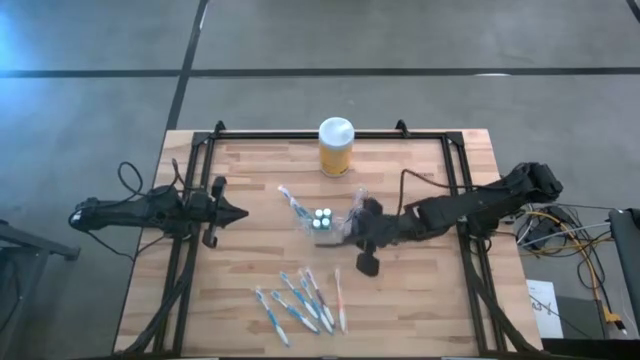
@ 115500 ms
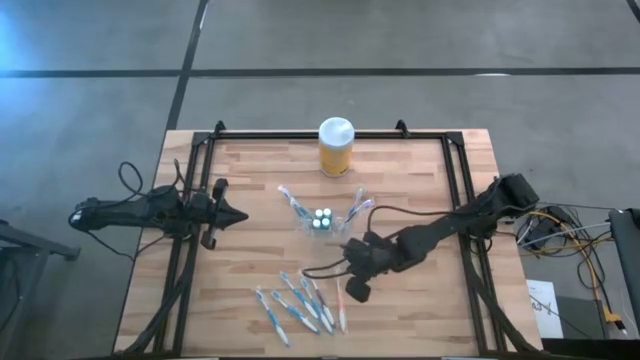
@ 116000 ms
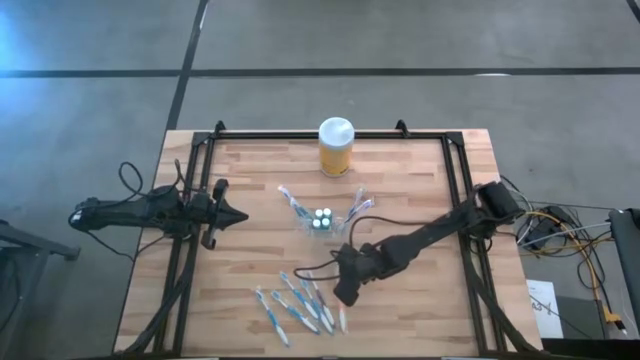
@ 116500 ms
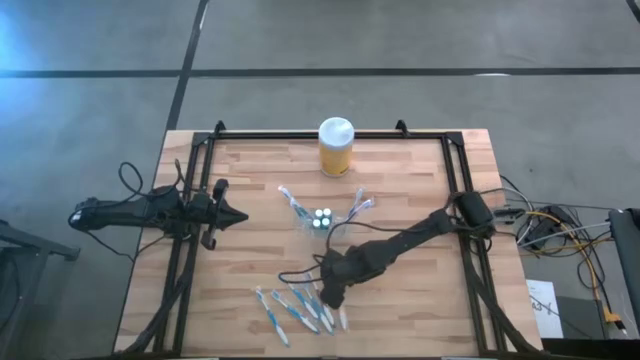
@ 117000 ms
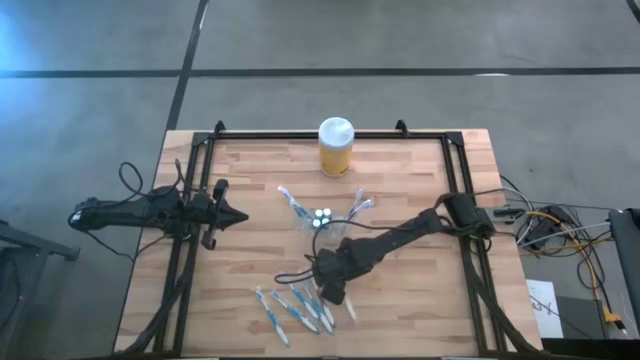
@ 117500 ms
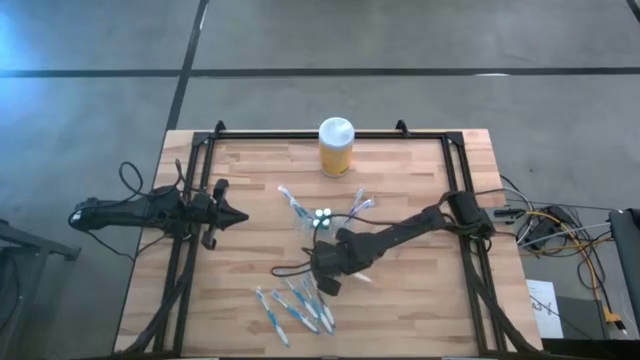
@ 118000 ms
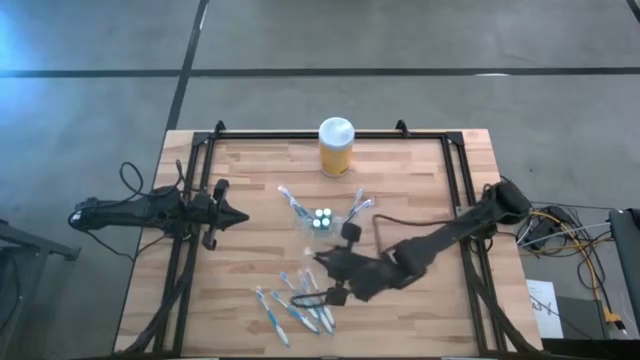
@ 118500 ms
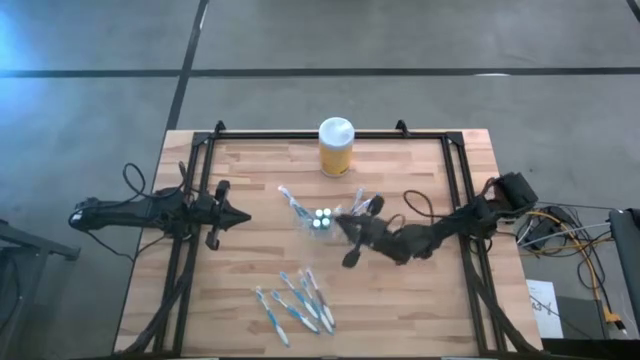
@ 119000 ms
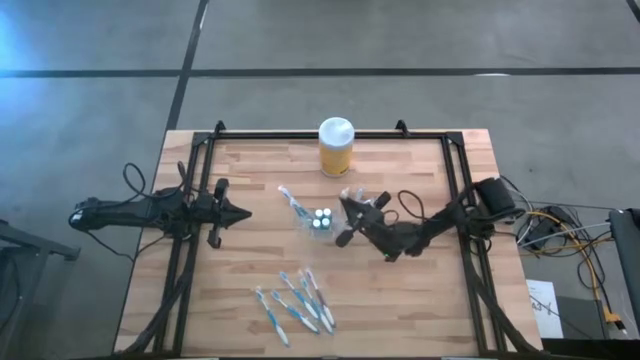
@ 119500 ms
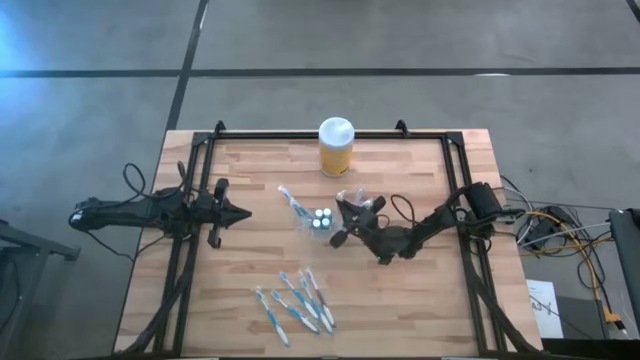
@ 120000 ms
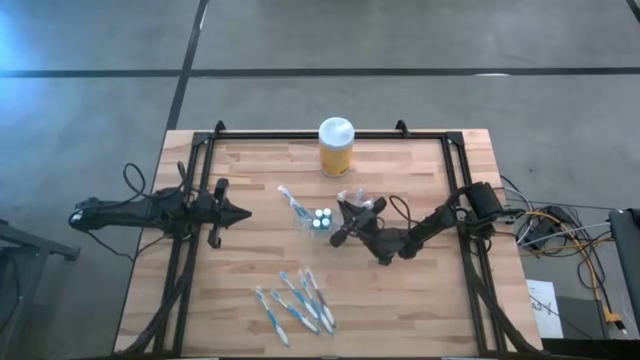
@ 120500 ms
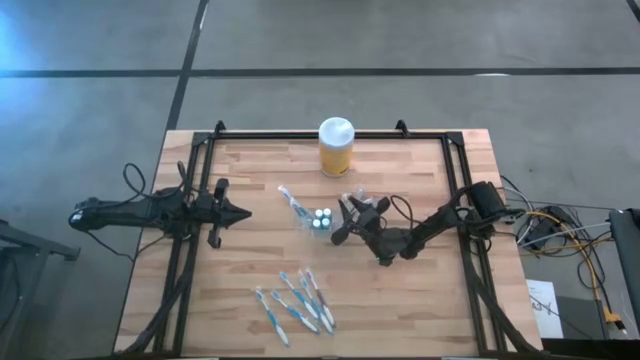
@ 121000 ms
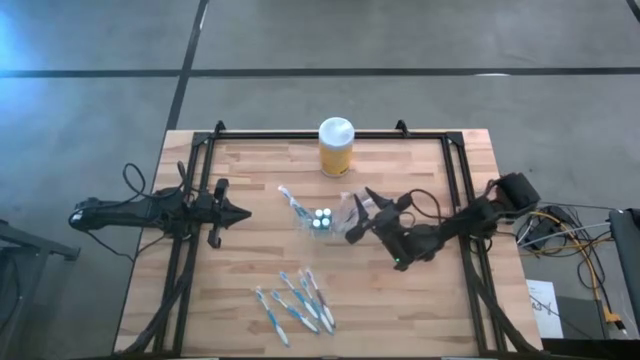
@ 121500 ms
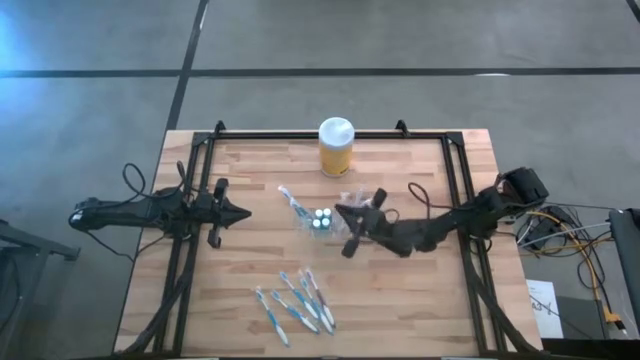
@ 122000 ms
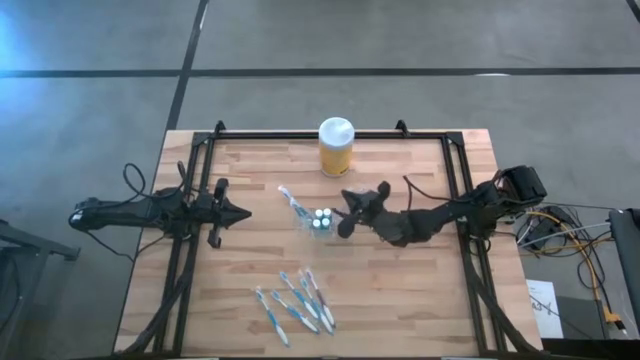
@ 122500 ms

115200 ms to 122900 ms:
Task: Pick & Place toothbrushing station
Put the orange toothbrush into the transparent organizer

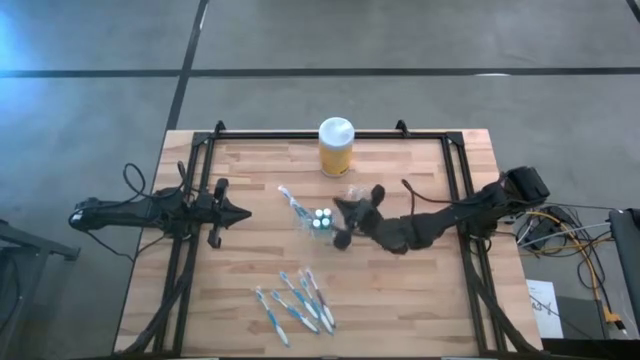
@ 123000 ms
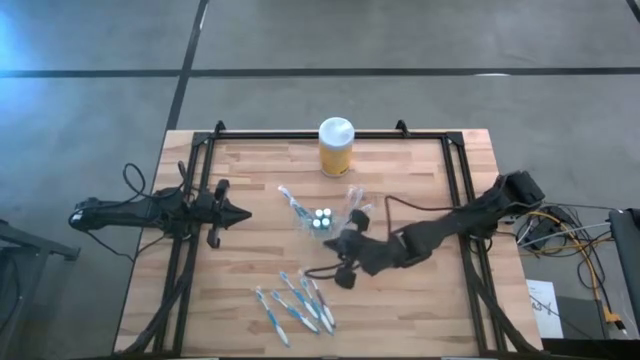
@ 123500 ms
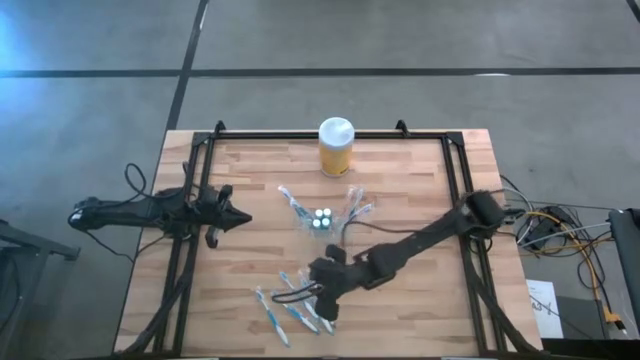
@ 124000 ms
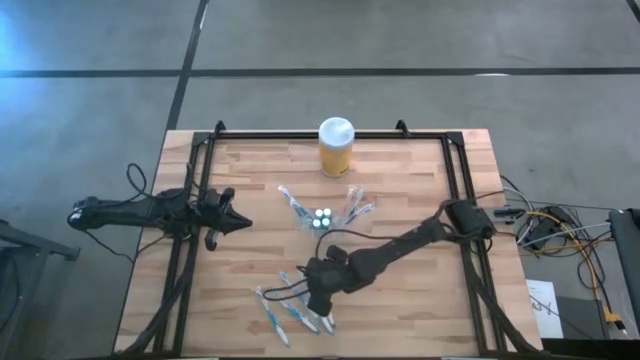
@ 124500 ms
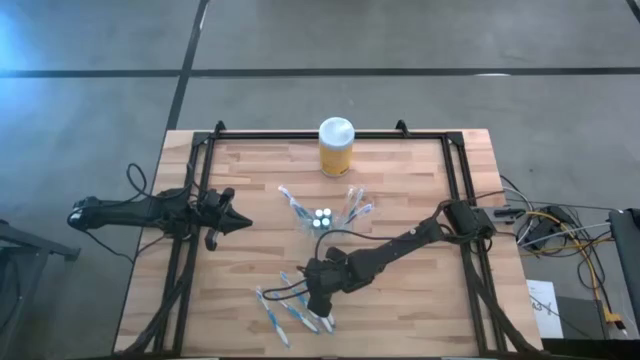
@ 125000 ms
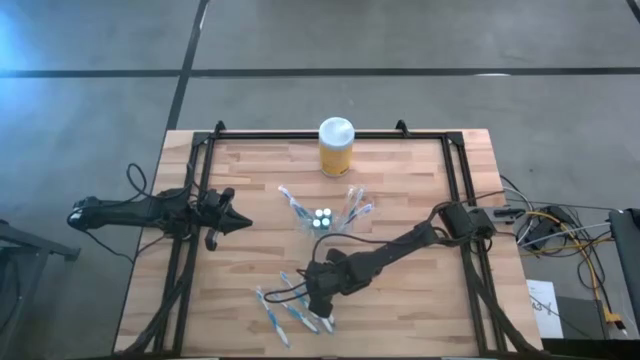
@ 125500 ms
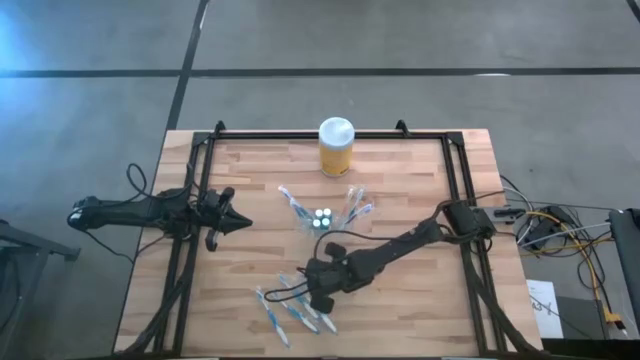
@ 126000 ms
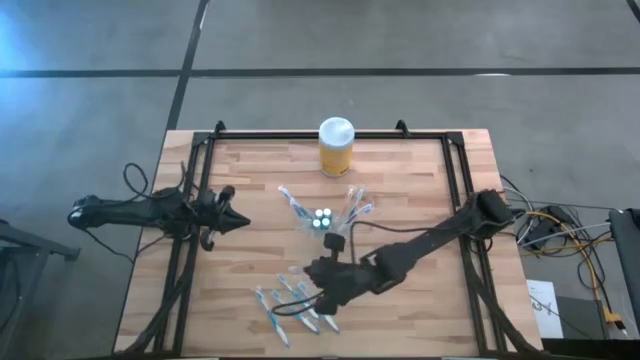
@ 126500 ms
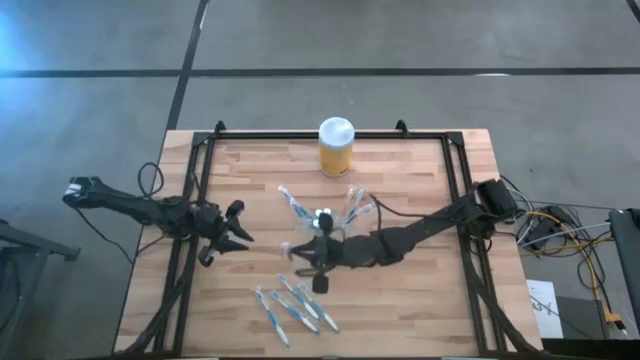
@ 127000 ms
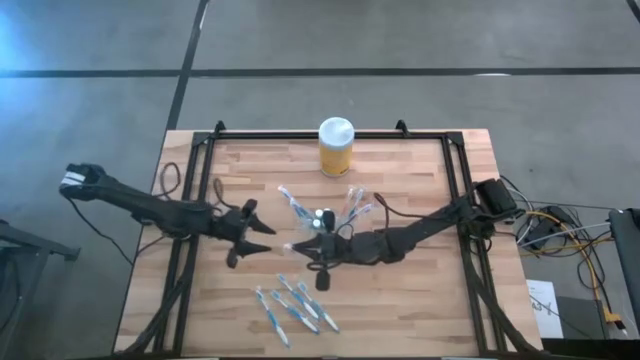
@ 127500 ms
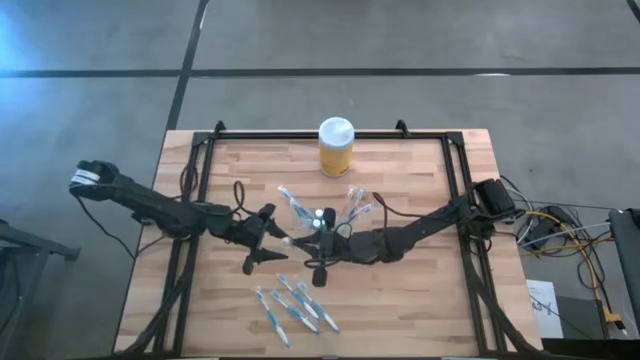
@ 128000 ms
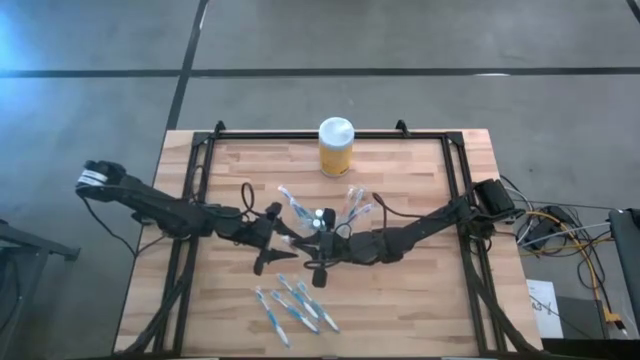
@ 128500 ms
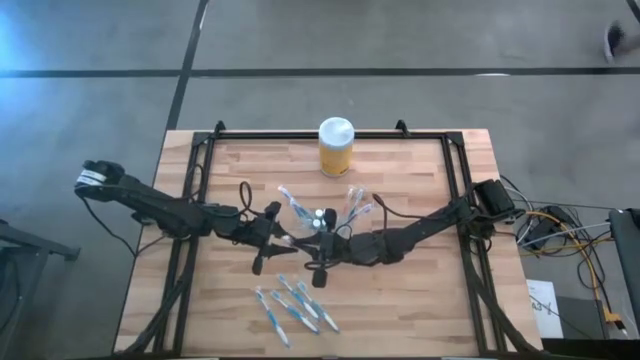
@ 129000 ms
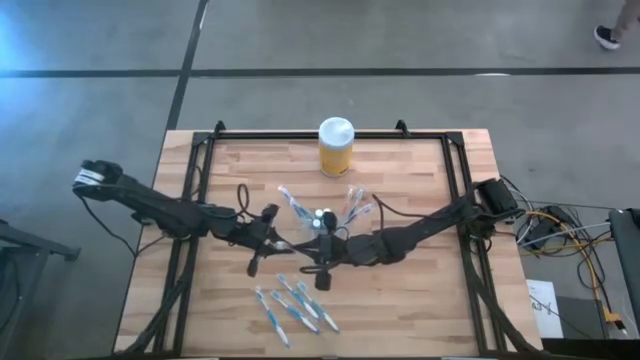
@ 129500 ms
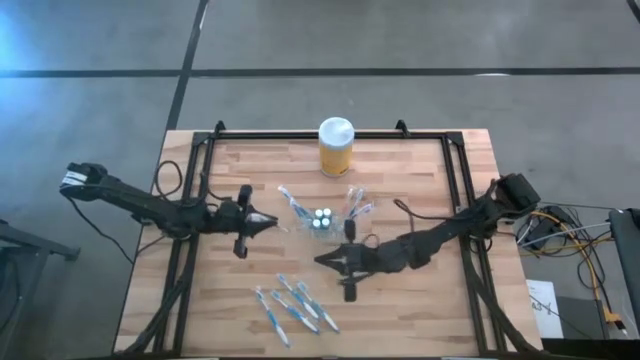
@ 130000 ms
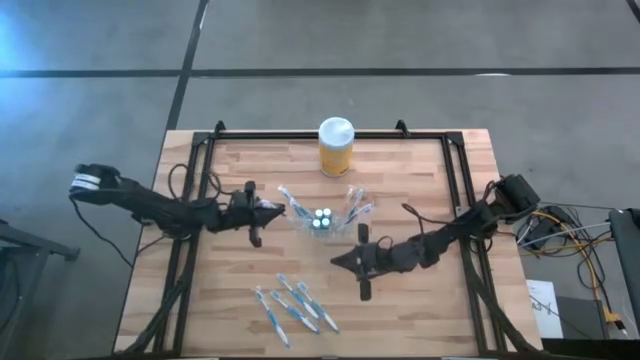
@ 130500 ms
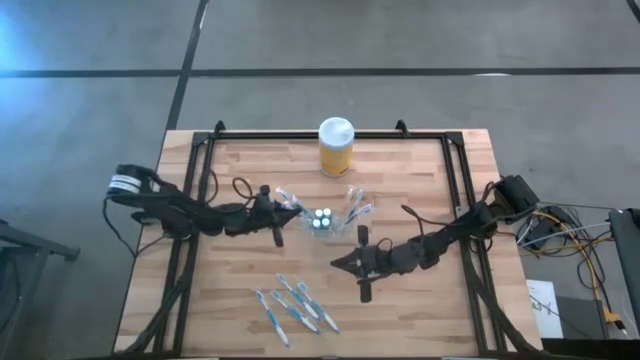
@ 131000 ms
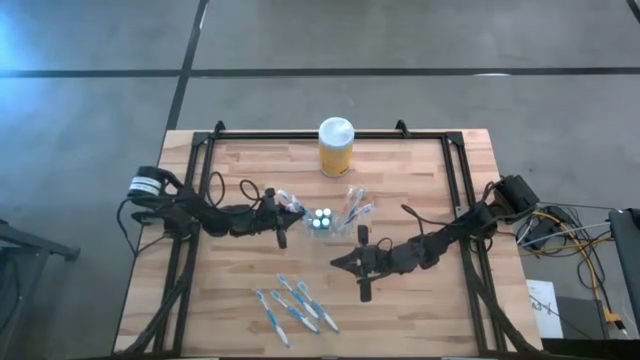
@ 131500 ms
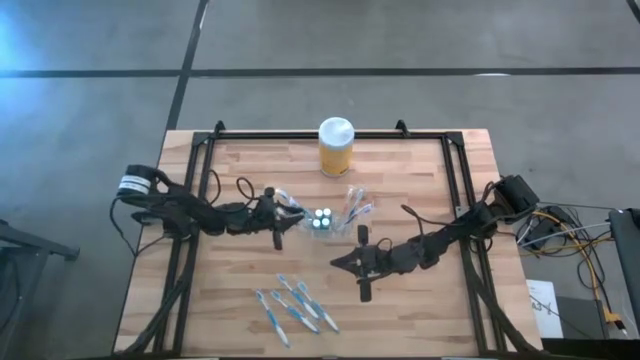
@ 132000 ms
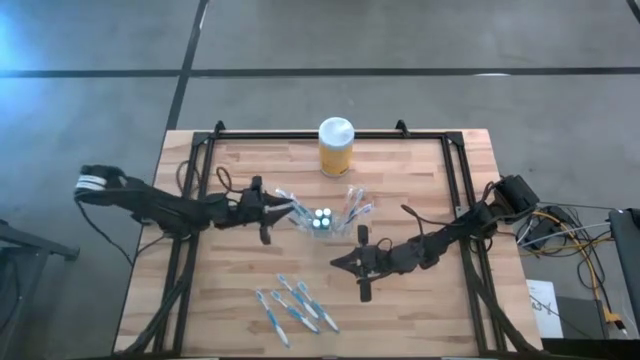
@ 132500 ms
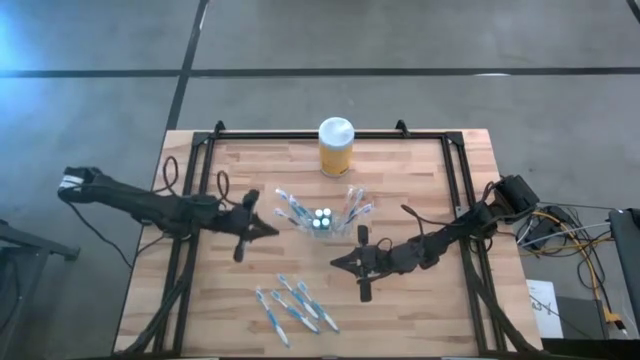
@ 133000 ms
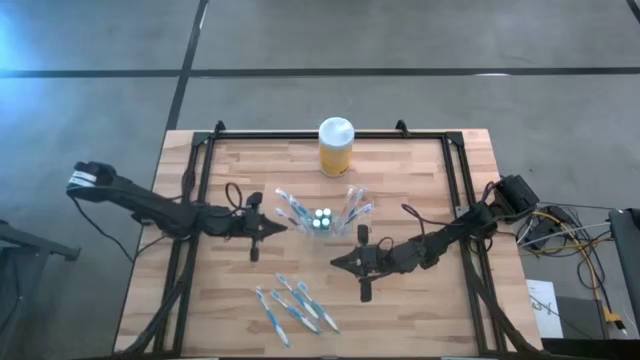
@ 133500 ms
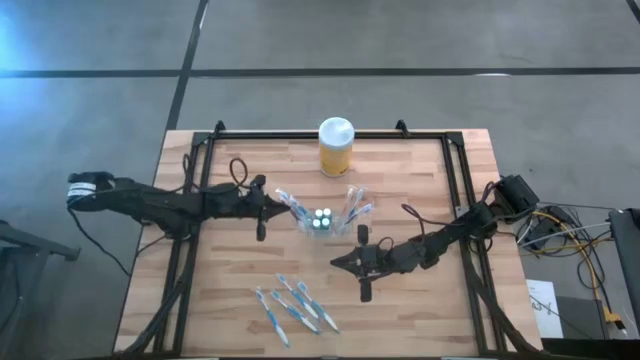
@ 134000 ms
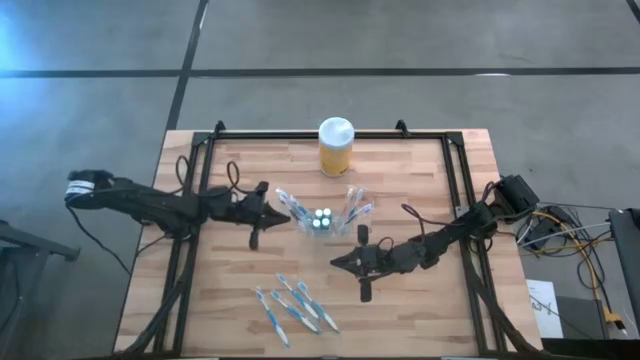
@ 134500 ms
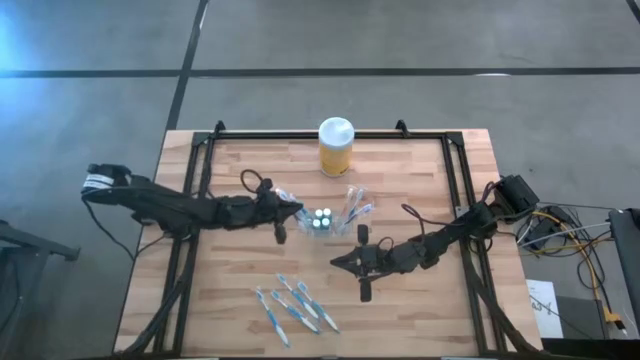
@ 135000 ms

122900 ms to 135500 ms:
Put the purple toothbrush into the transparent organizer
